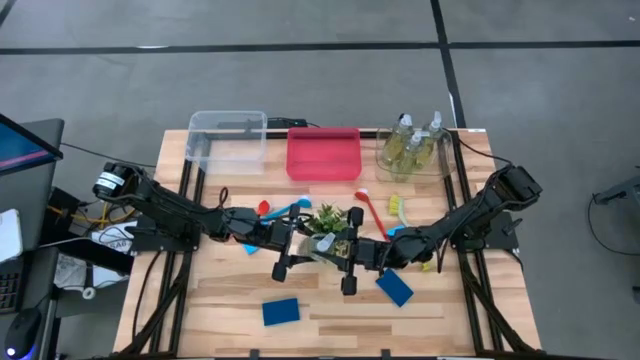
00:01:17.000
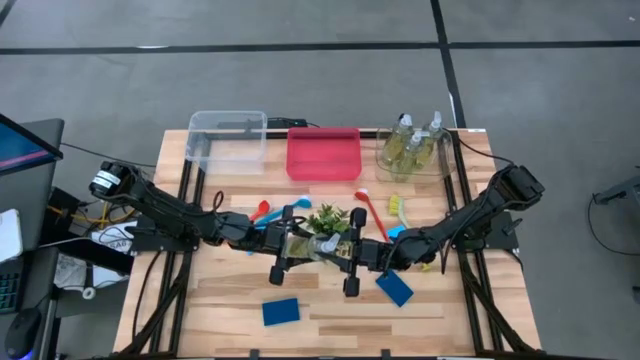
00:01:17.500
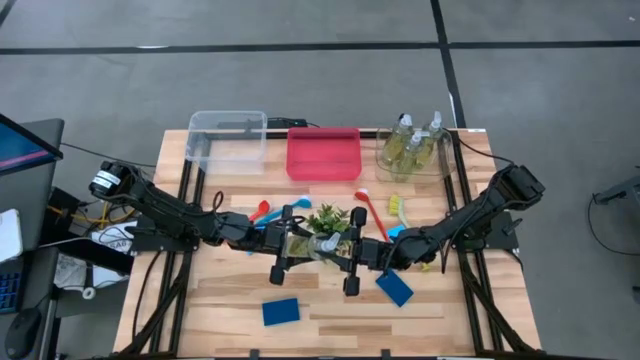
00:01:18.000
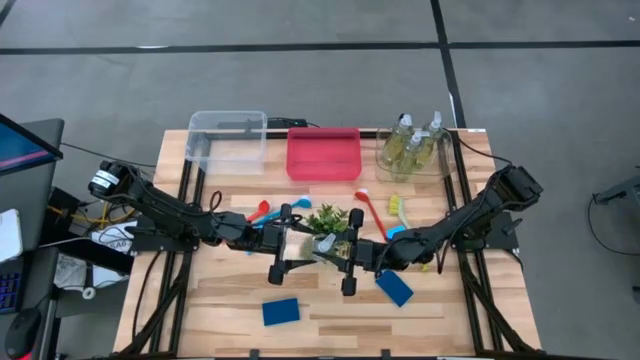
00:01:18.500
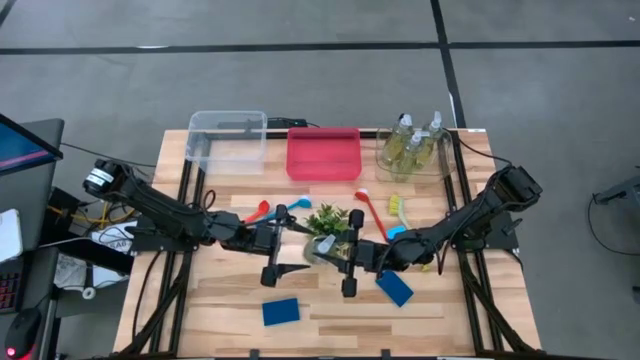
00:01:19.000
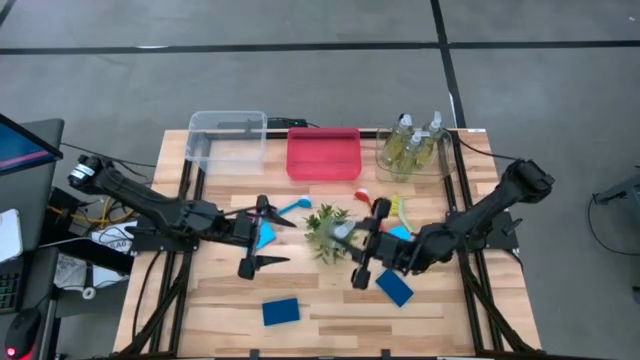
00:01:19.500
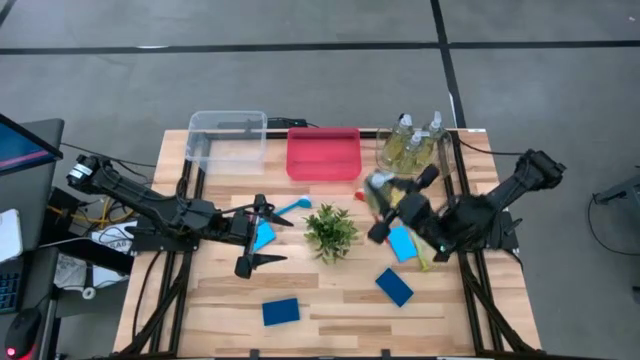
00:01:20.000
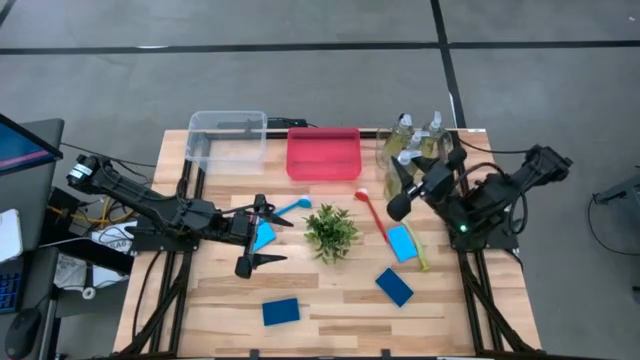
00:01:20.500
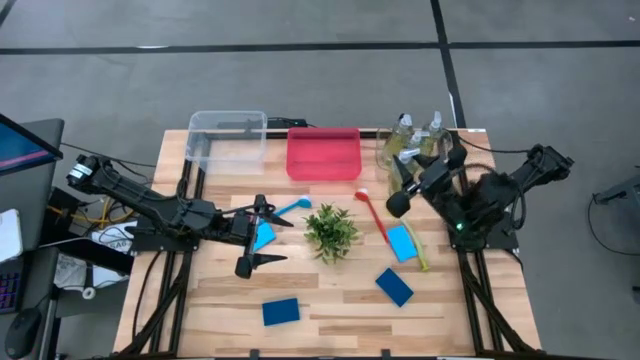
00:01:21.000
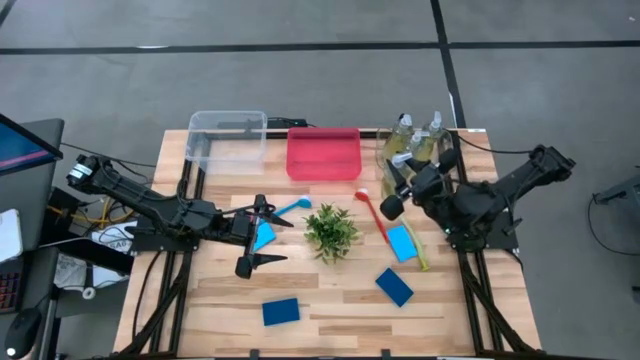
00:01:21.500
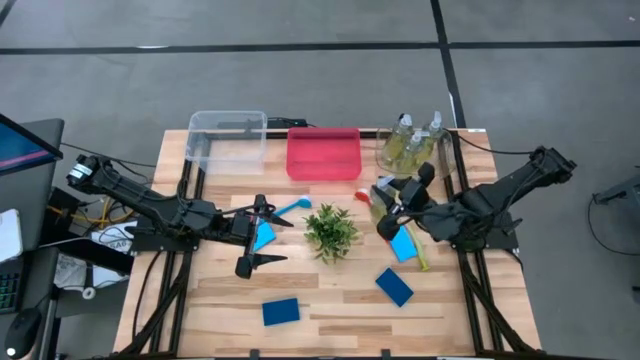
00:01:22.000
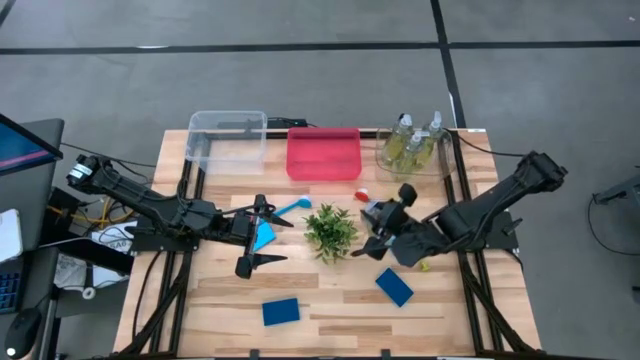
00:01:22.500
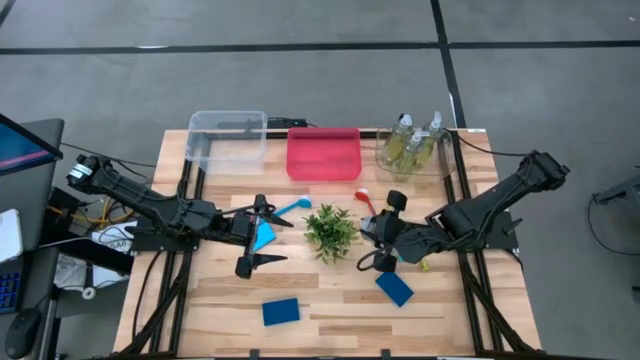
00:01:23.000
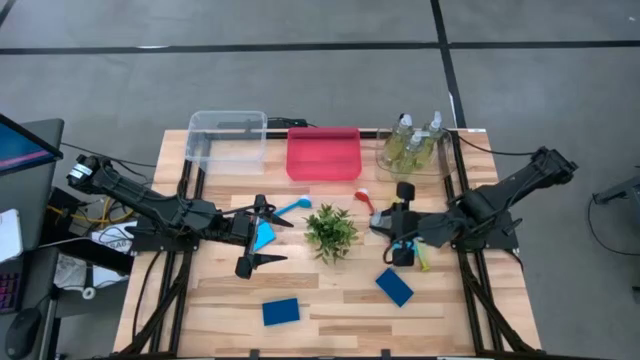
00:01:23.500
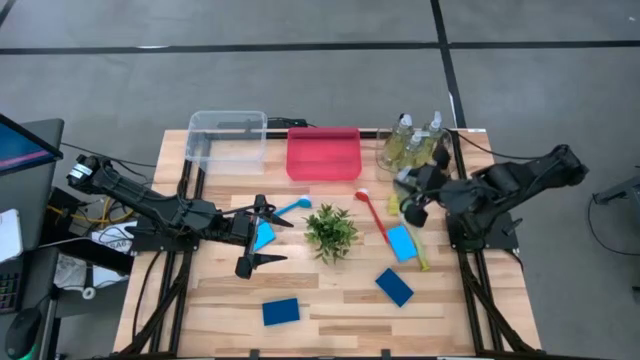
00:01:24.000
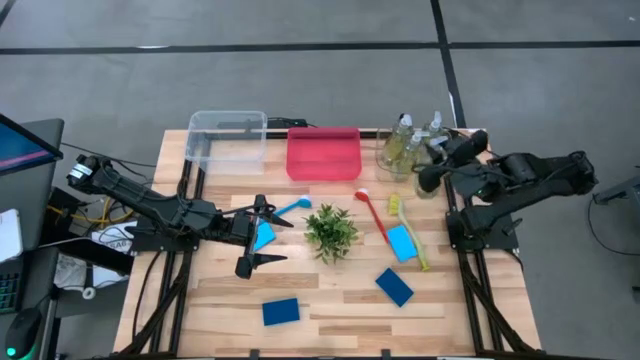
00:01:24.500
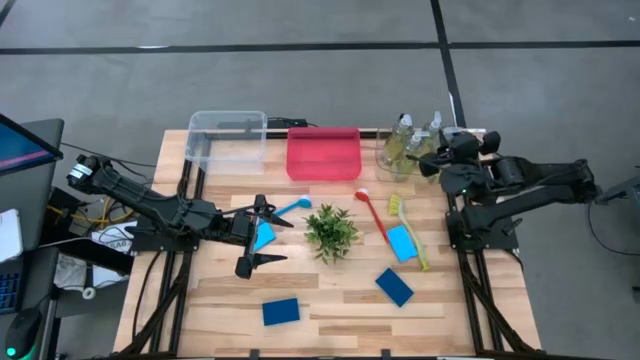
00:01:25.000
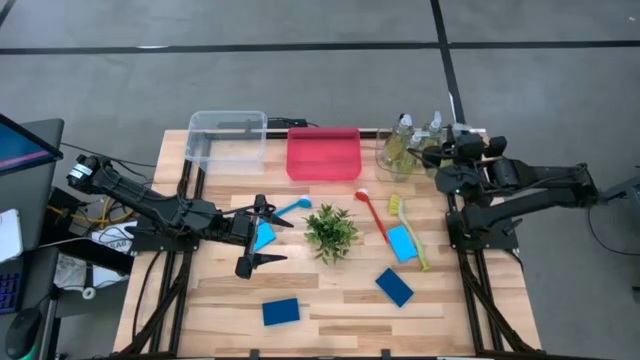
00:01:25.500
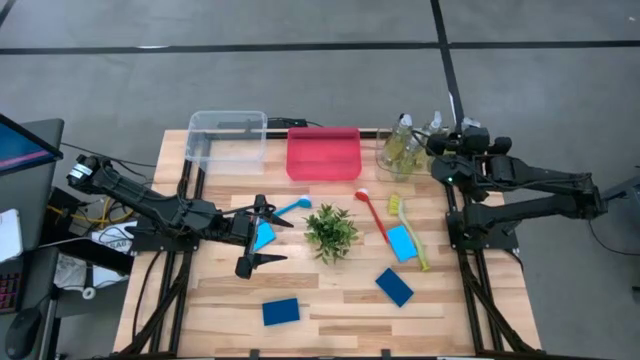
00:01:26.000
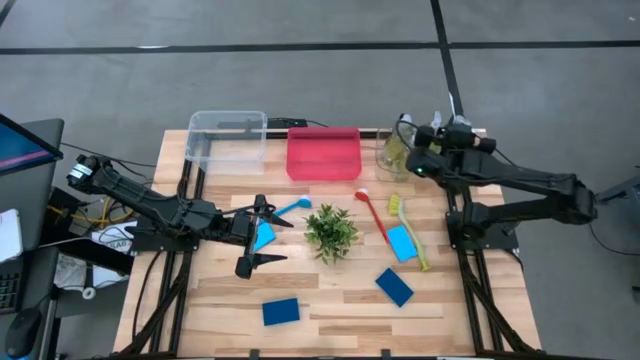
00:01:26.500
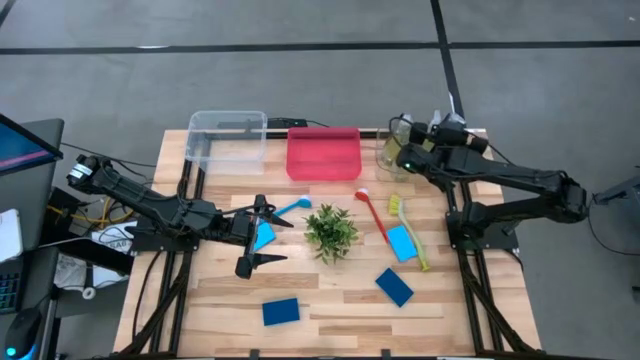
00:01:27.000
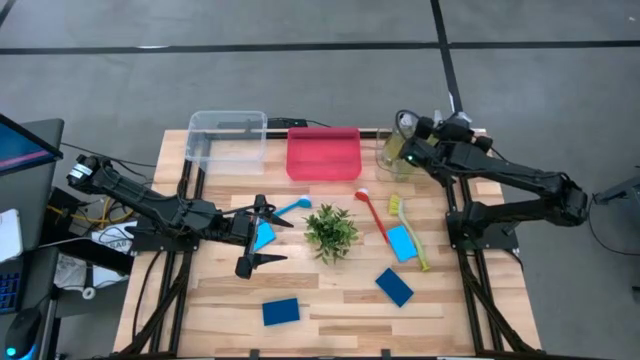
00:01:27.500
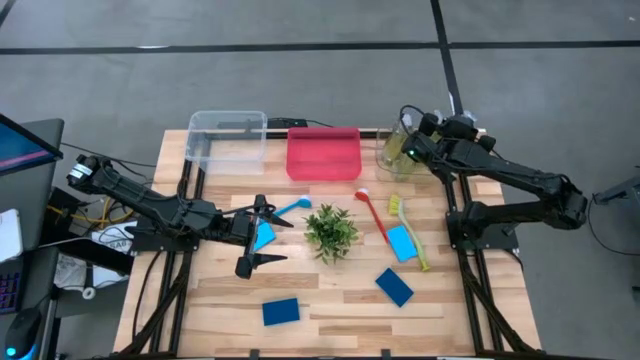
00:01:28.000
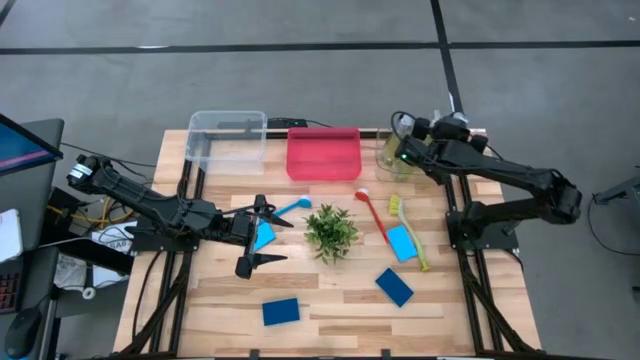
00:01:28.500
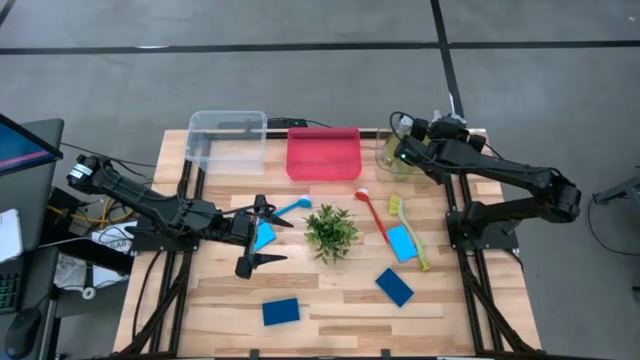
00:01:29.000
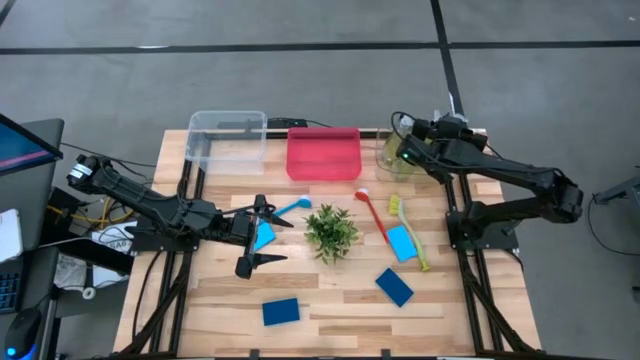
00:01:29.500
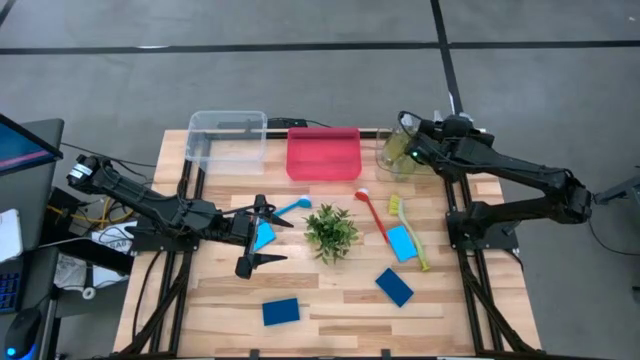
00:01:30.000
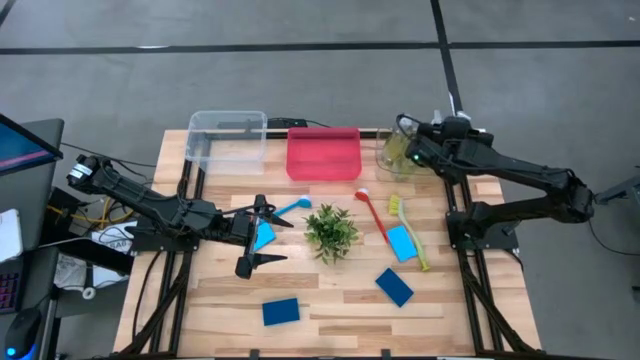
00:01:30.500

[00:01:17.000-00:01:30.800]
Task: Pick & Place Kitchen Sink Supplies
Put the green dishwashing liquid dispenser into the right transparent bin

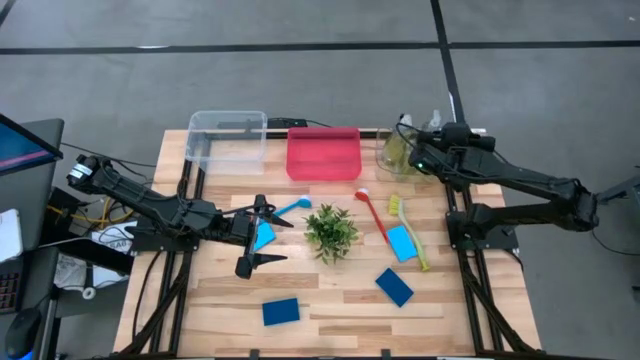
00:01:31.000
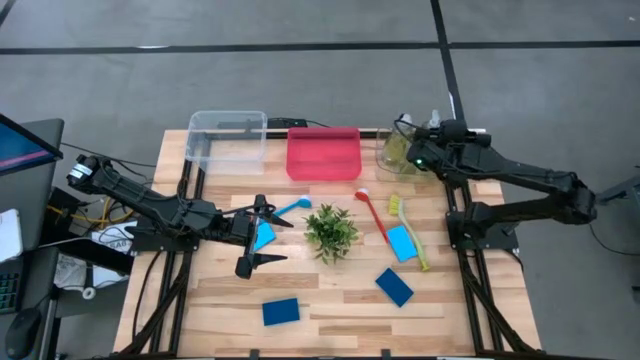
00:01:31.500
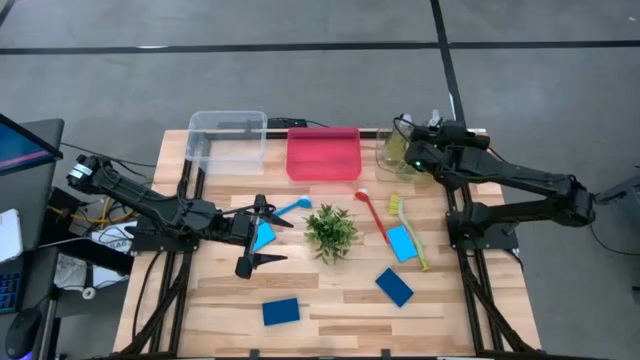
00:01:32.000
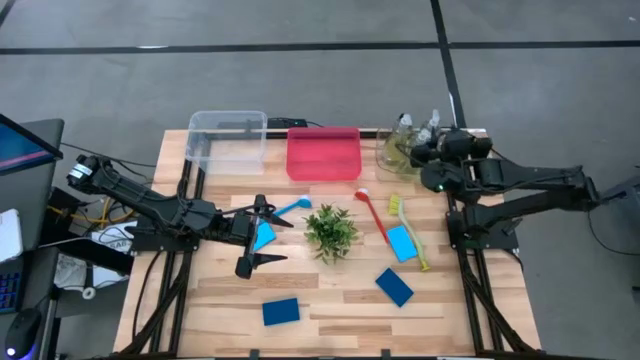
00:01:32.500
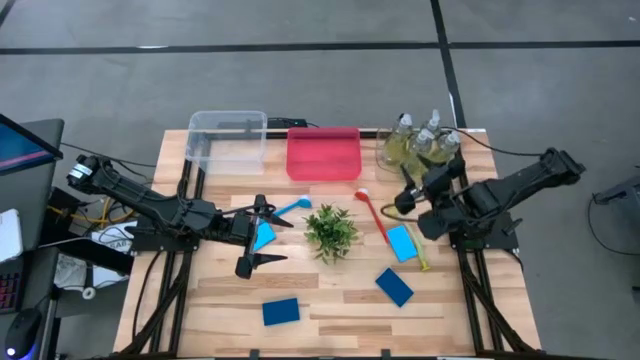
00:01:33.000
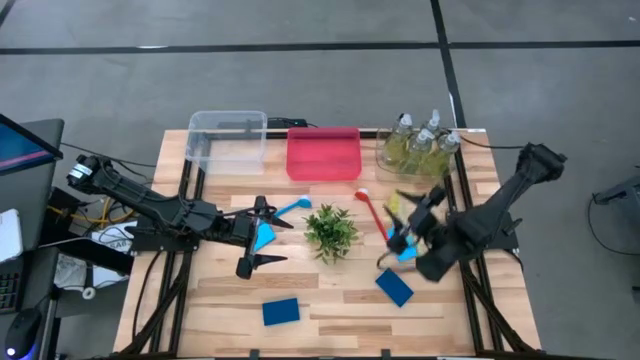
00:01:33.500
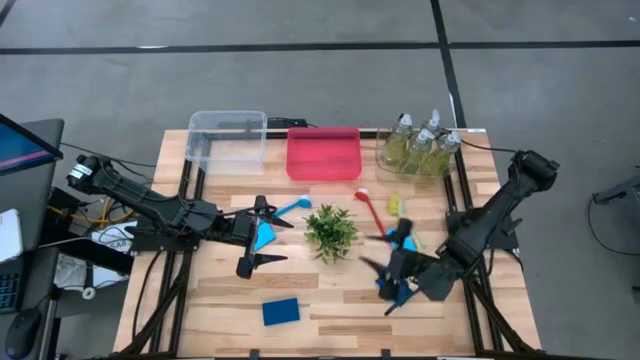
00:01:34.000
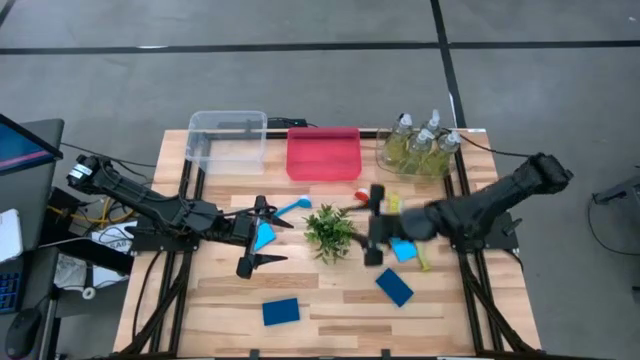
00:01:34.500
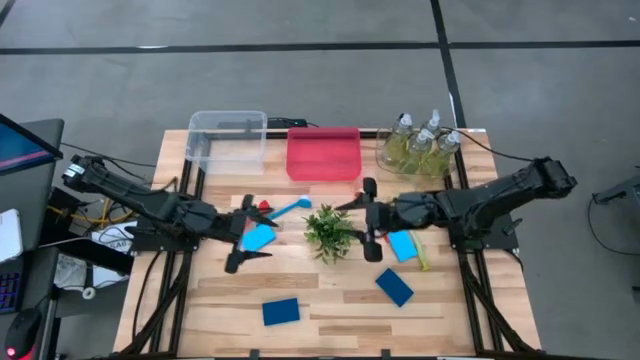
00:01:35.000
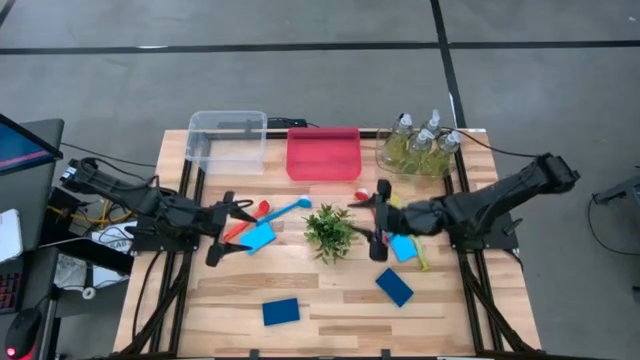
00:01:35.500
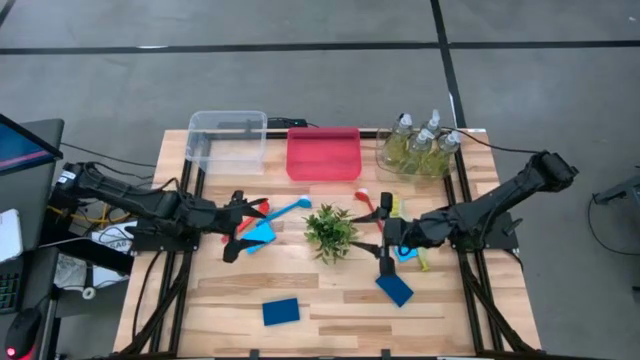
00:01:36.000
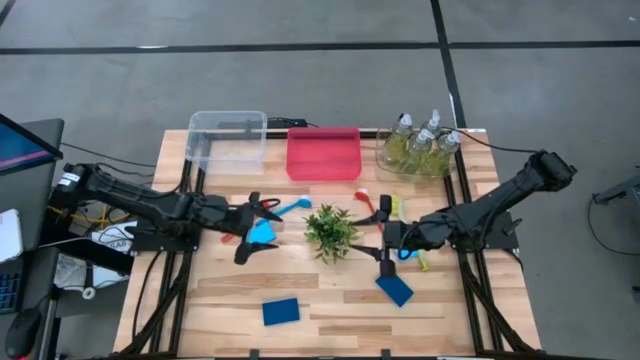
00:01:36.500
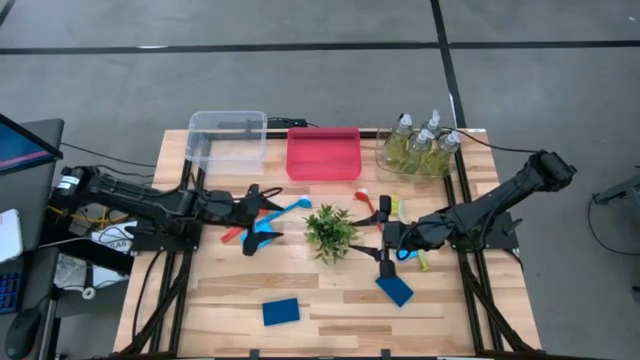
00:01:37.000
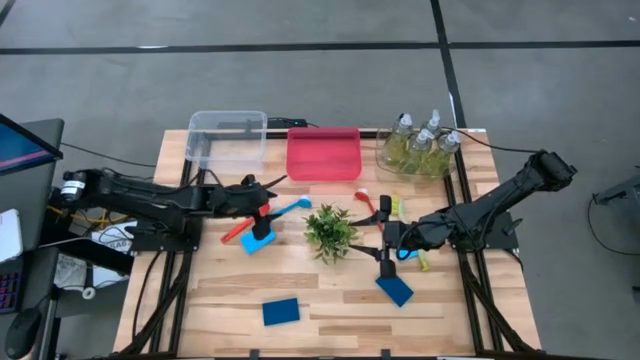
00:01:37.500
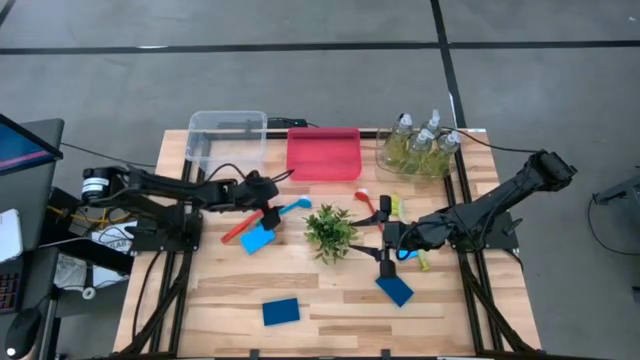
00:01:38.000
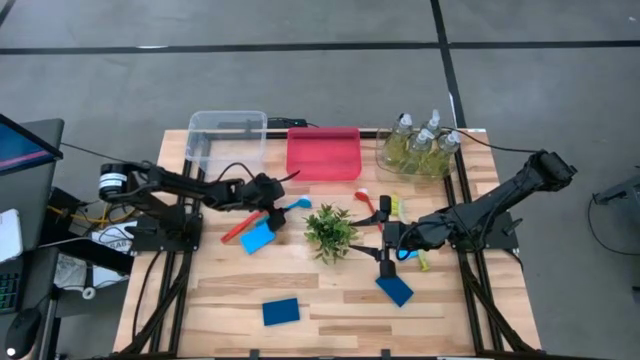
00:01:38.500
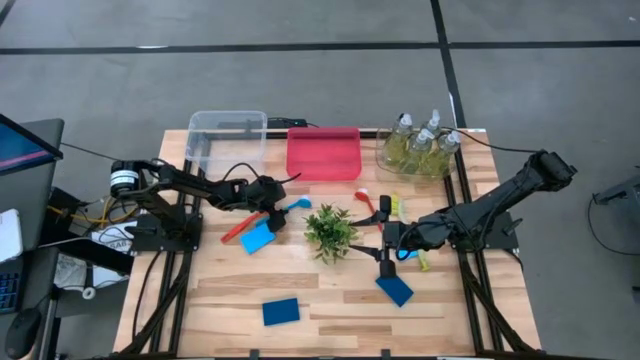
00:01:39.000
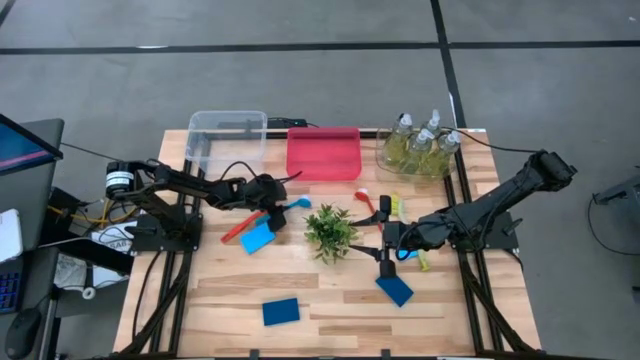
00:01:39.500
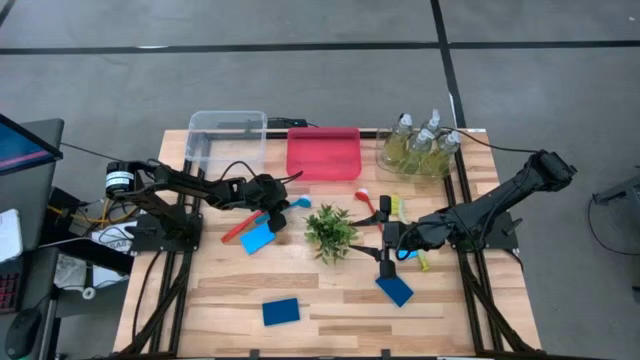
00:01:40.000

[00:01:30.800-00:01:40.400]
Put the blue dish brush into the left transparent bin
